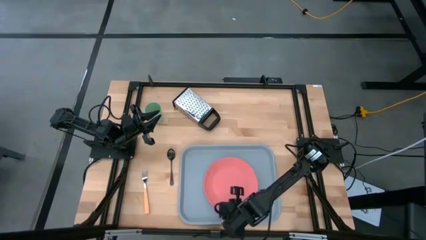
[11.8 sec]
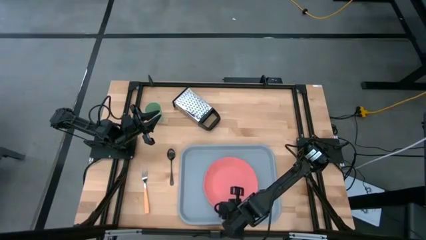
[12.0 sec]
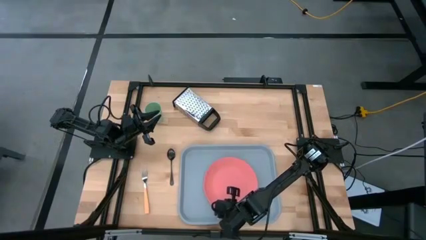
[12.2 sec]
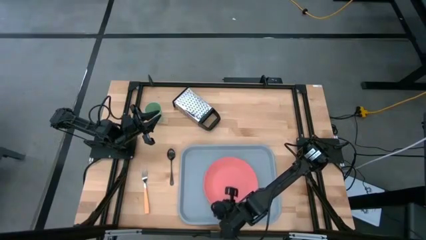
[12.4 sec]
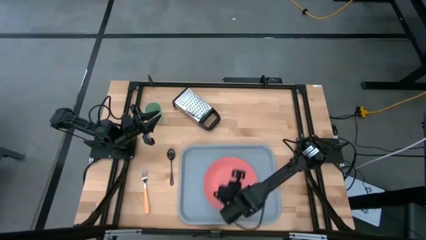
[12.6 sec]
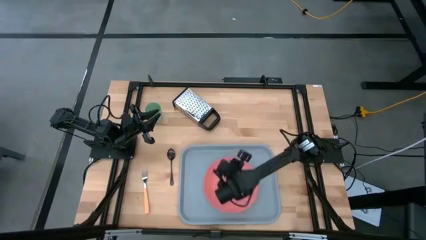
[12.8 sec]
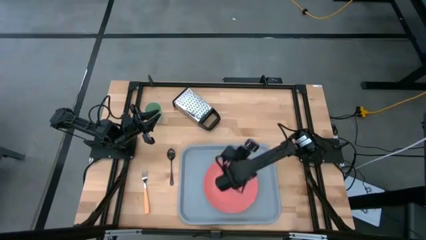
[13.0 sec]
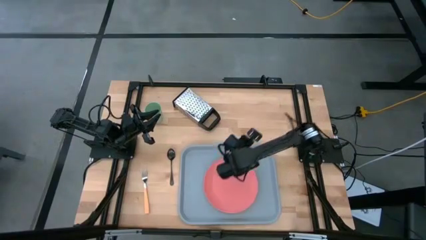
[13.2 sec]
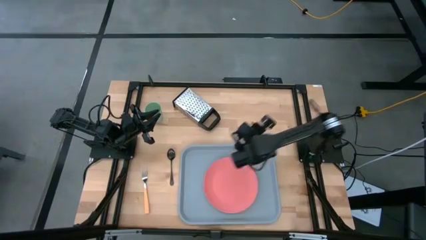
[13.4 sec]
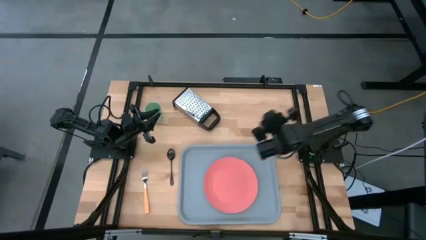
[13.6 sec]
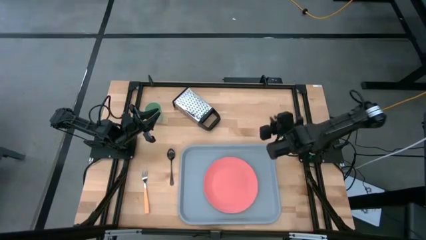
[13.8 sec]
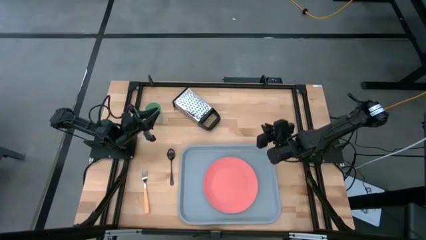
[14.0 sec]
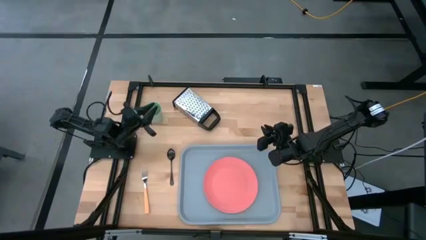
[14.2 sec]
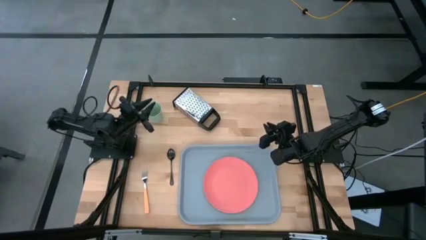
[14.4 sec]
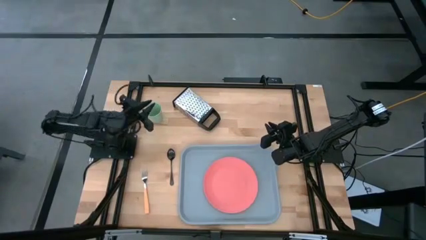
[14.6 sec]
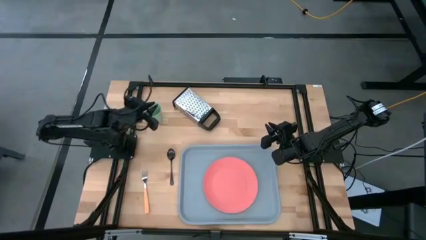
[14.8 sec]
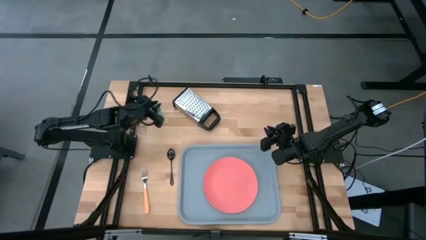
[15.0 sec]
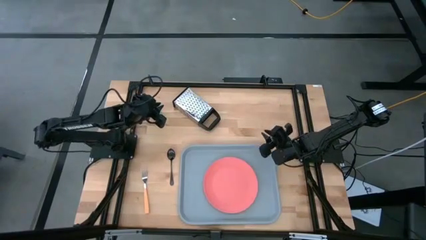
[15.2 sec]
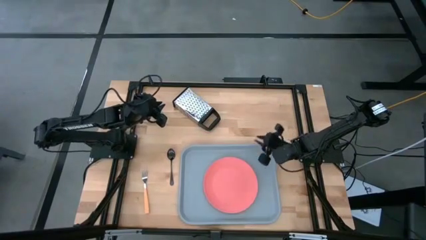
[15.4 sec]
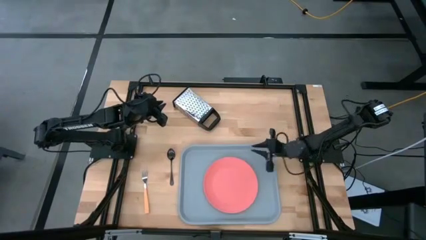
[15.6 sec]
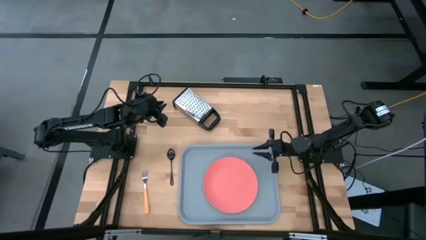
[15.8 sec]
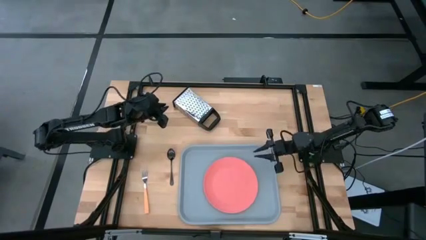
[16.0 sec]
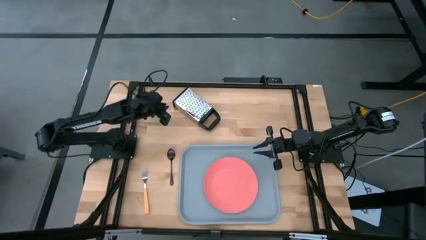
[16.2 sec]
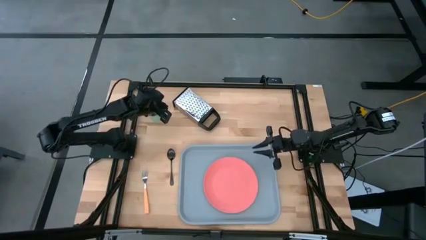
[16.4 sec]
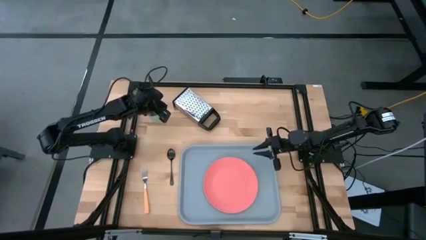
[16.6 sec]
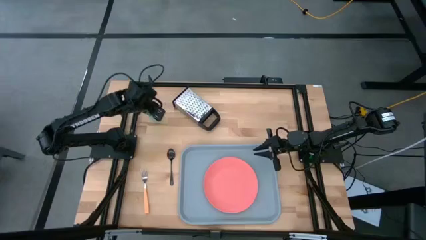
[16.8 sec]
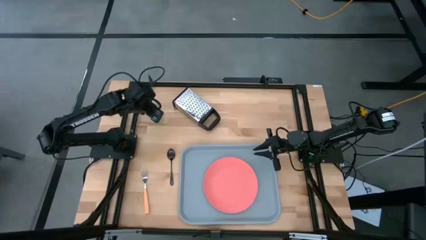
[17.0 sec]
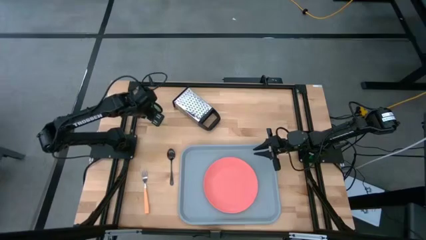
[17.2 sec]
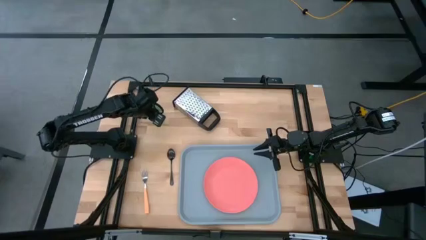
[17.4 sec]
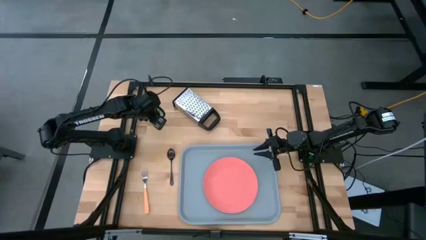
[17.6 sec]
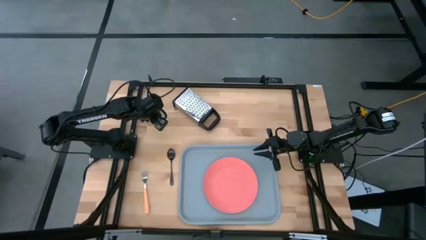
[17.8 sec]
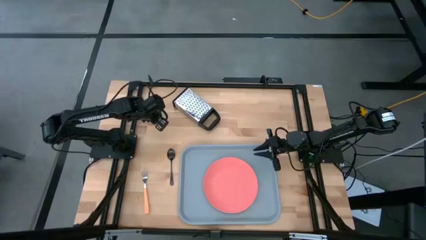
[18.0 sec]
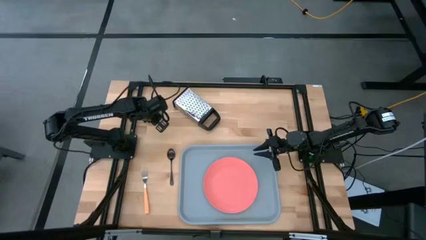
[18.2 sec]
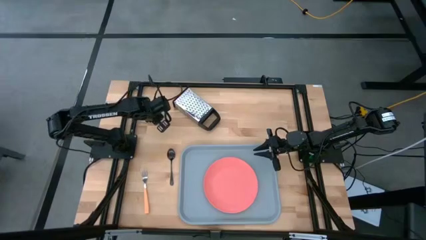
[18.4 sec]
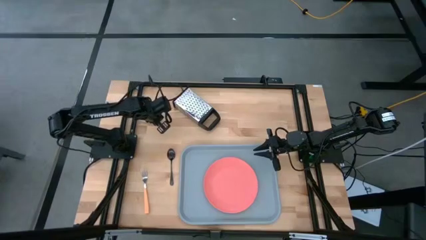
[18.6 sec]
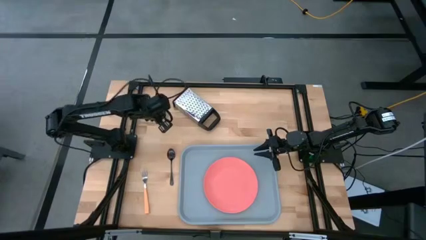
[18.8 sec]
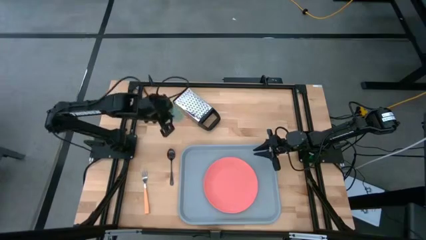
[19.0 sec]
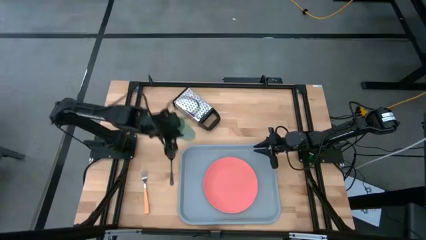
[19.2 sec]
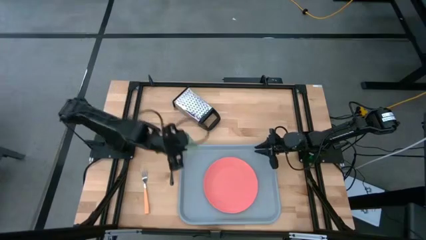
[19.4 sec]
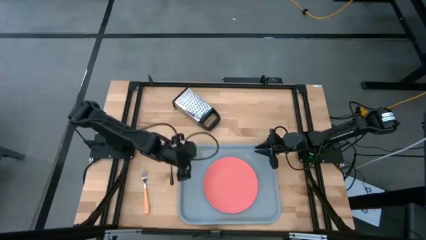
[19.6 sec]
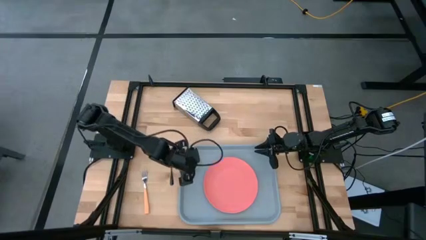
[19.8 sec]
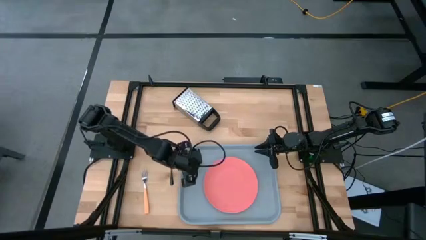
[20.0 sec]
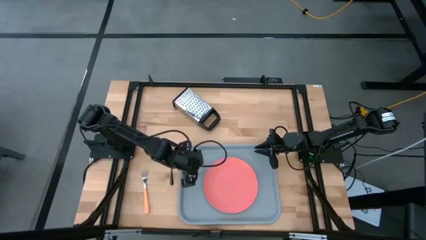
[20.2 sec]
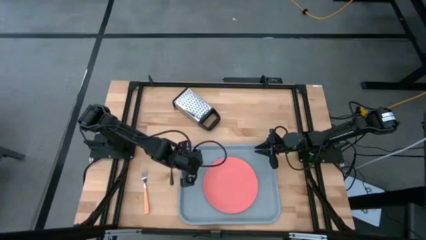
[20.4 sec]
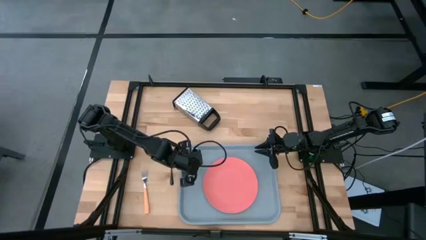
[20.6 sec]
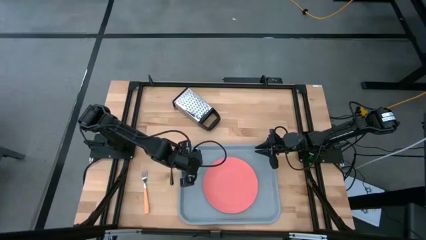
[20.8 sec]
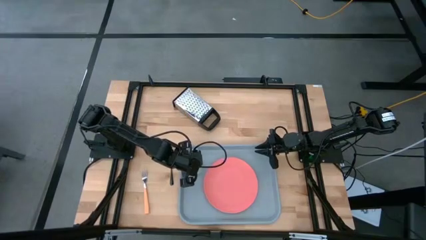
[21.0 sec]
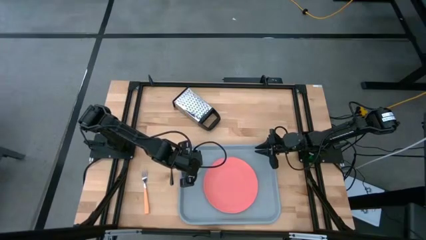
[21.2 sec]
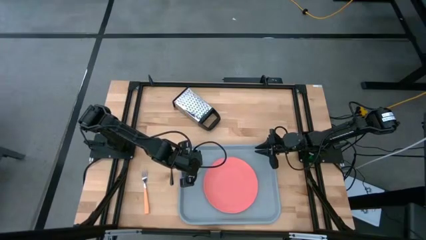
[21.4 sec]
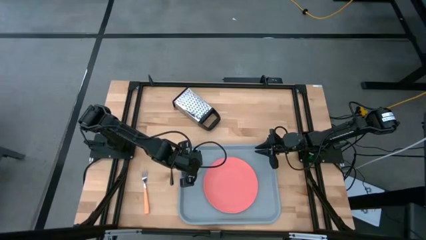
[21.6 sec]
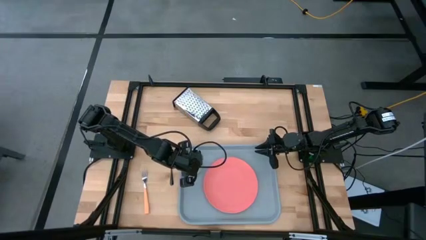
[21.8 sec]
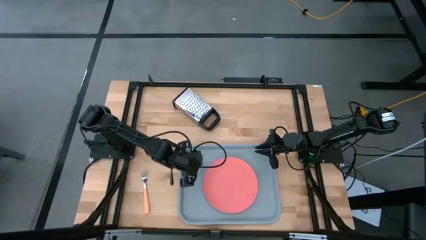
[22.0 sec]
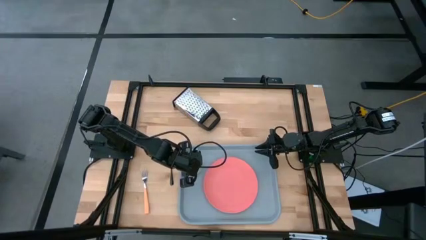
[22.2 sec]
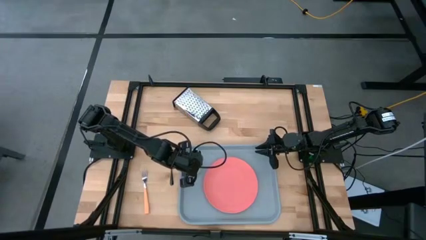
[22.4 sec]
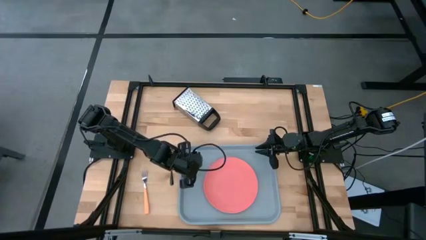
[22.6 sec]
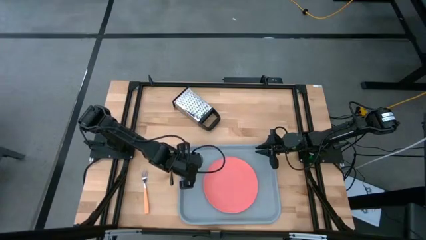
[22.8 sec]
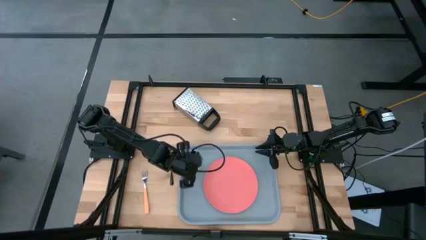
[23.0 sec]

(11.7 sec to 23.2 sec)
Task: Pick and place plate/cup/fork/spoon on tray
Put the cup on the serving tray

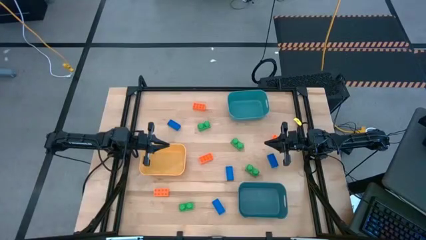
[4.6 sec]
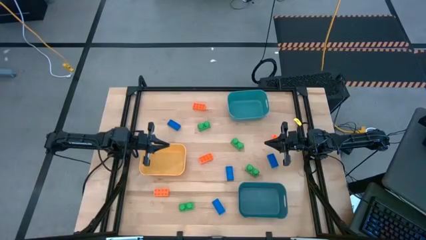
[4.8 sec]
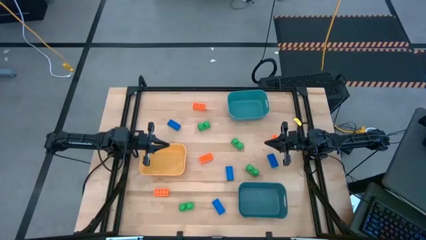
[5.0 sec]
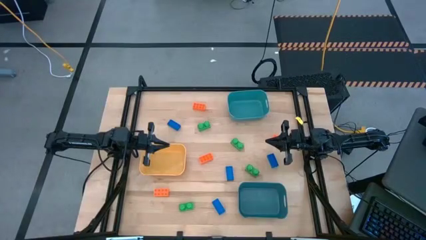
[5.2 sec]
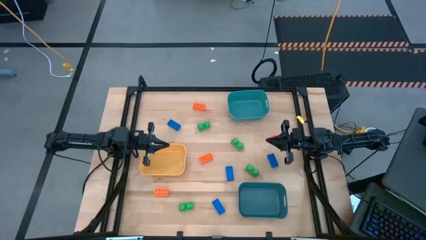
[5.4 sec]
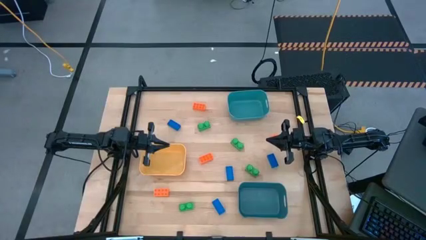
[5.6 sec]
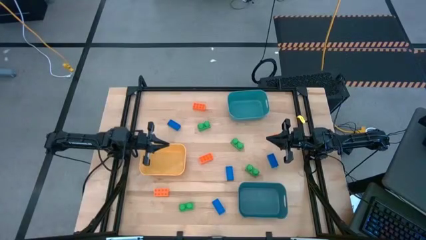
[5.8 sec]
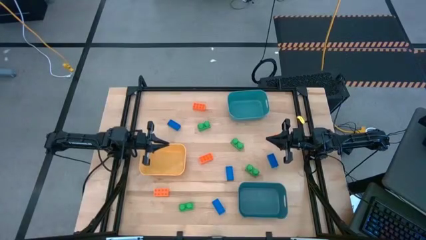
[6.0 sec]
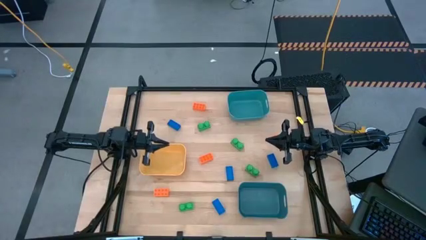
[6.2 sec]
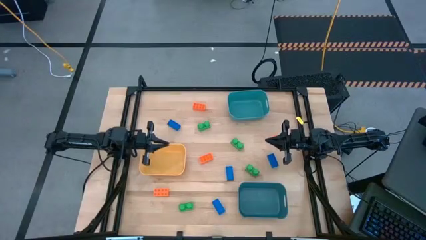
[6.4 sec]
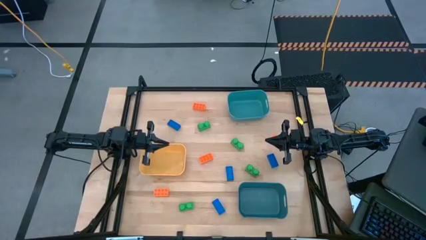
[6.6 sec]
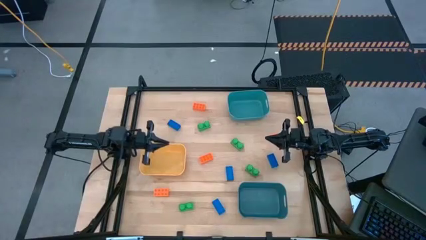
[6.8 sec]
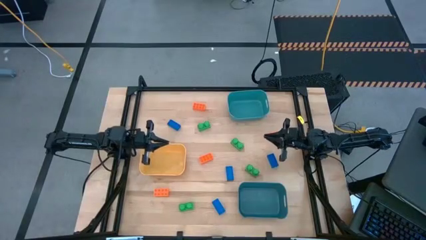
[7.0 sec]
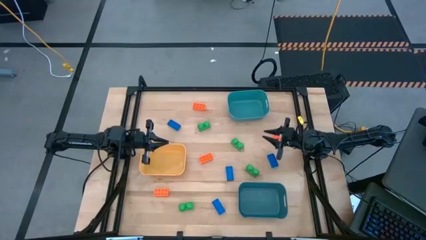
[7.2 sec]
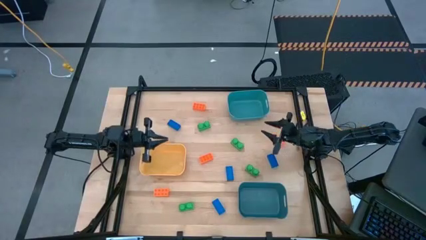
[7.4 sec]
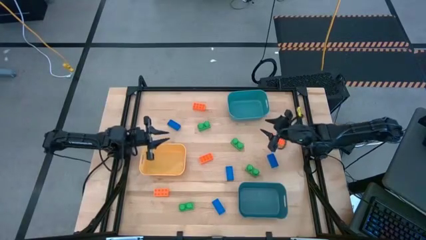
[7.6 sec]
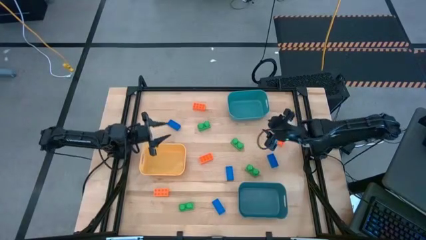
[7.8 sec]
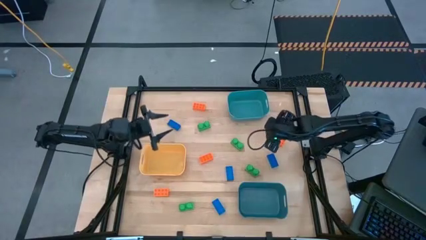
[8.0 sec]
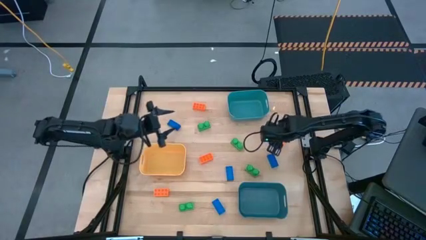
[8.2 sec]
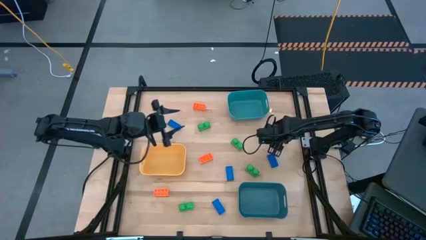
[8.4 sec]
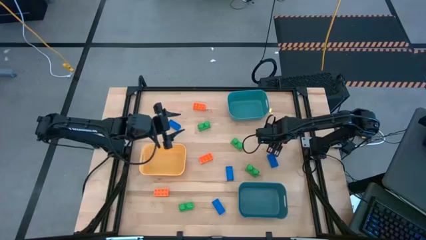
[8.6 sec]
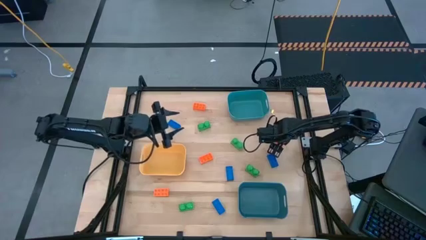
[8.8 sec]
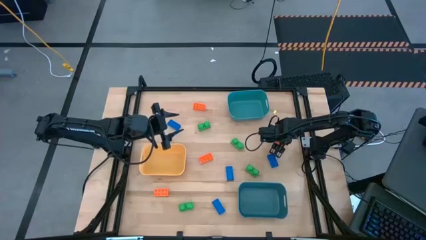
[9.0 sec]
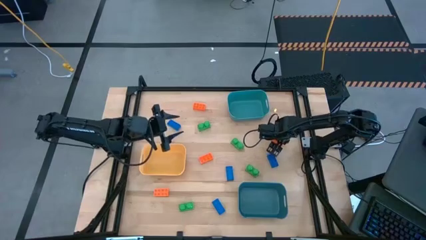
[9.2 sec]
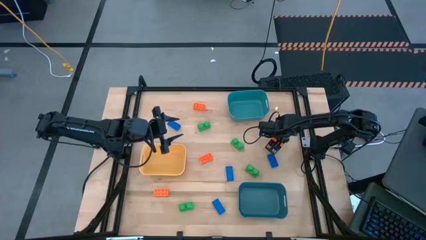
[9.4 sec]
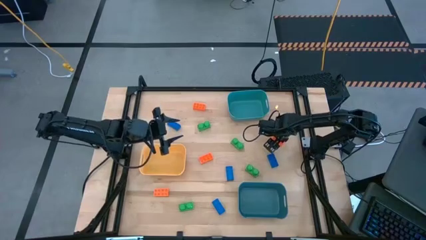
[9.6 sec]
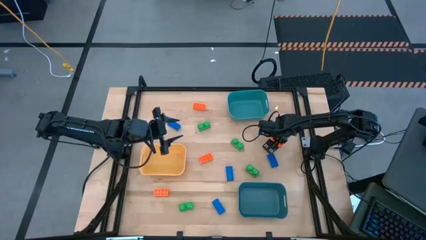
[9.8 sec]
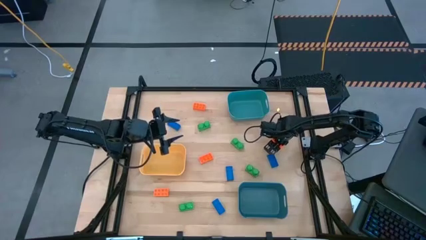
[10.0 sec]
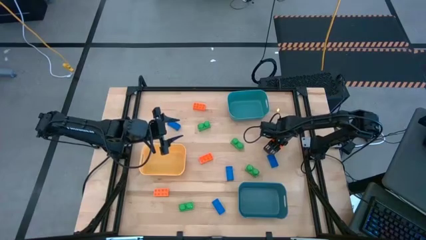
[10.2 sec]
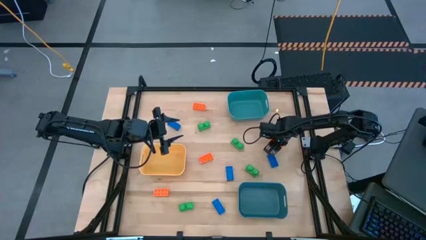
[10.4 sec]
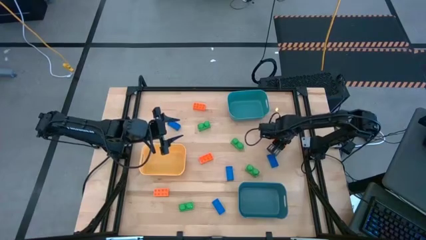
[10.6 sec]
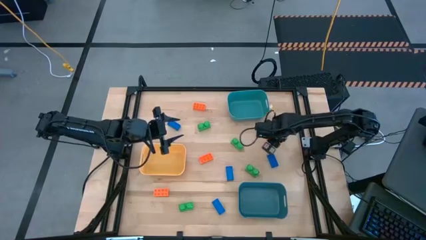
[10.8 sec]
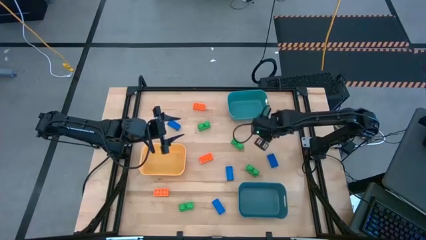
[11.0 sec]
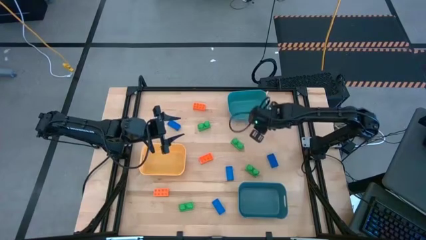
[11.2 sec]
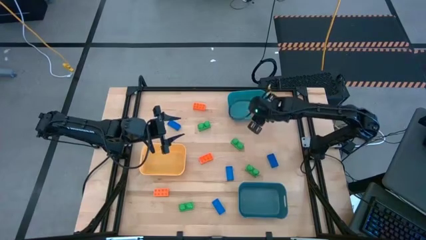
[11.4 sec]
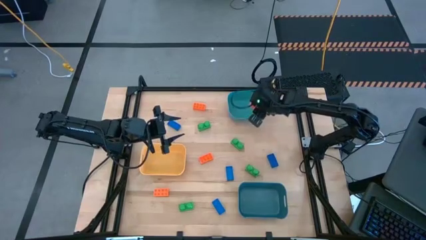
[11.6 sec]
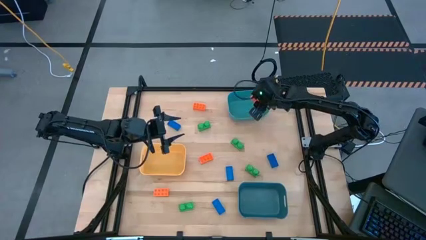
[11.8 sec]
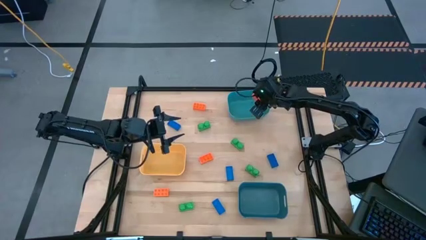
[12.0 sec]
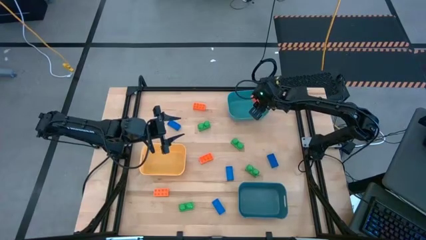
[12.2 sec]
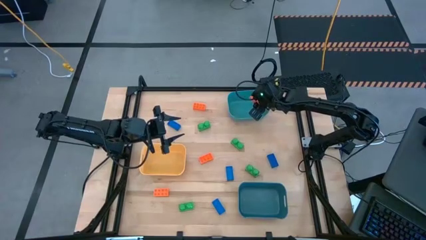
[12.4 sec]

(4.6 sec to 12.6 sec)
Task: Sort & place blocks by color
Put the orange game piece into the green bin
